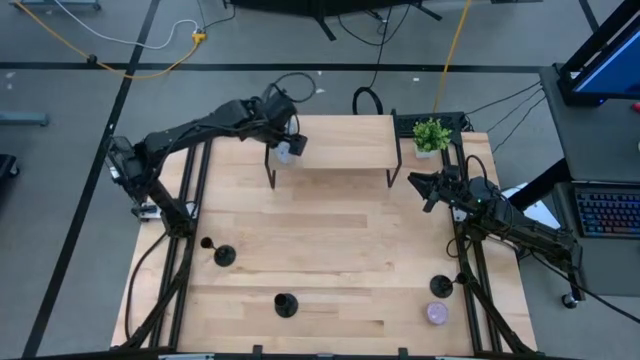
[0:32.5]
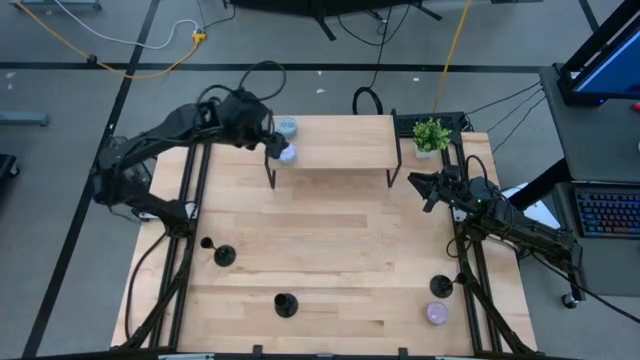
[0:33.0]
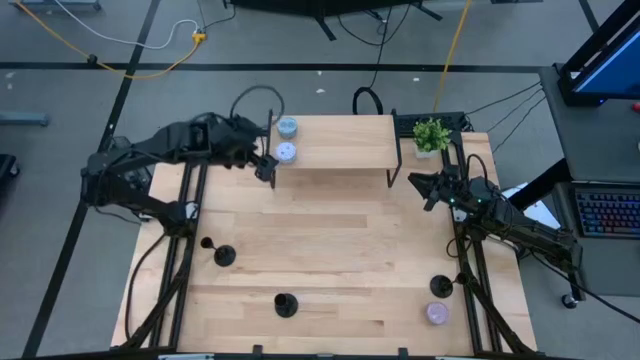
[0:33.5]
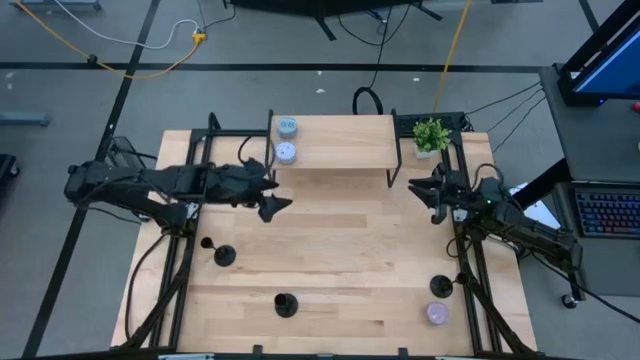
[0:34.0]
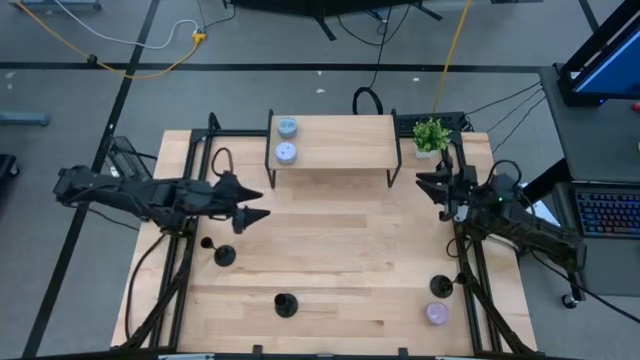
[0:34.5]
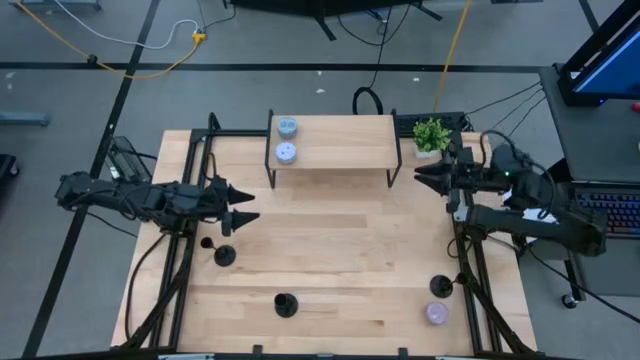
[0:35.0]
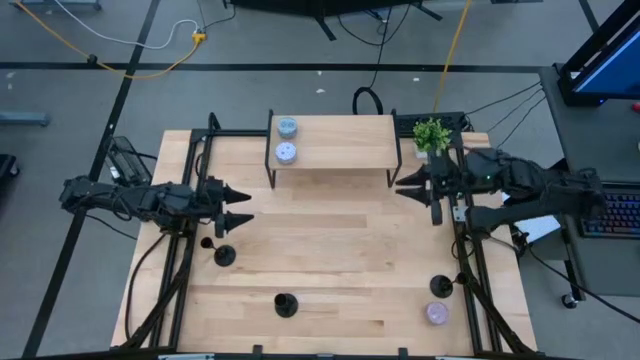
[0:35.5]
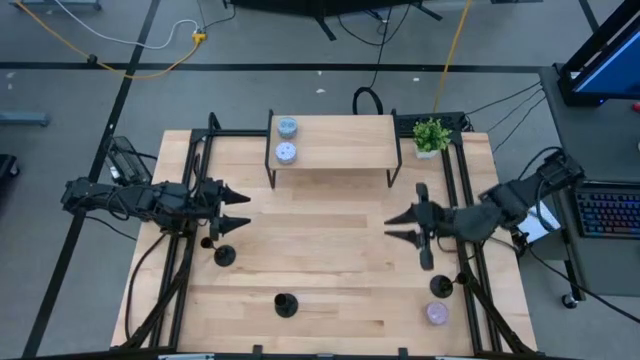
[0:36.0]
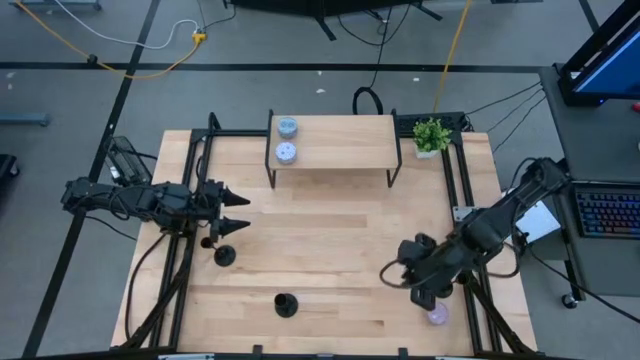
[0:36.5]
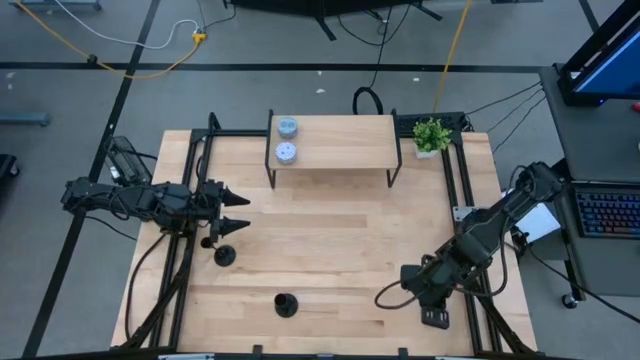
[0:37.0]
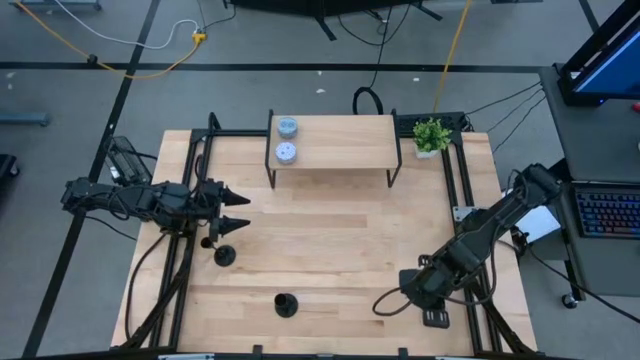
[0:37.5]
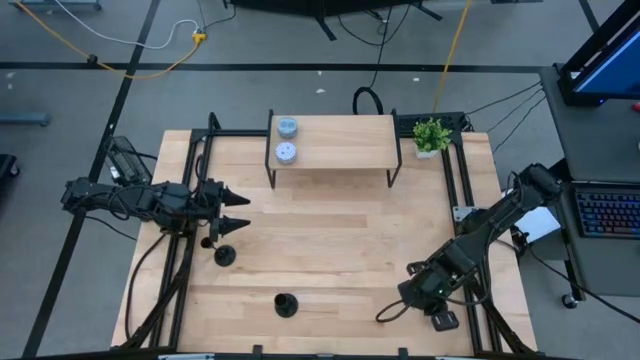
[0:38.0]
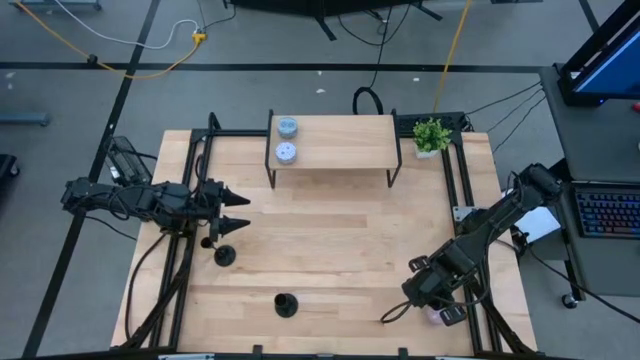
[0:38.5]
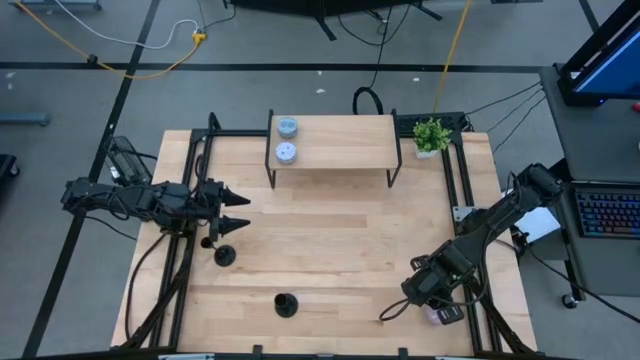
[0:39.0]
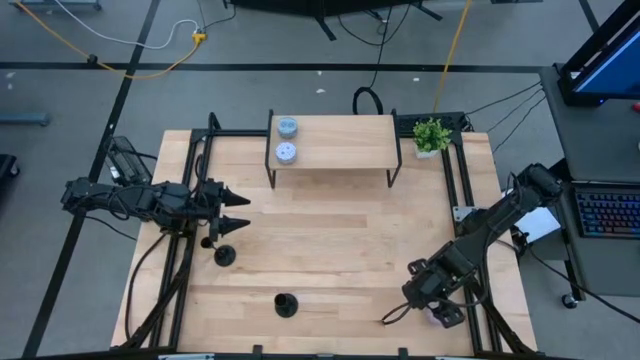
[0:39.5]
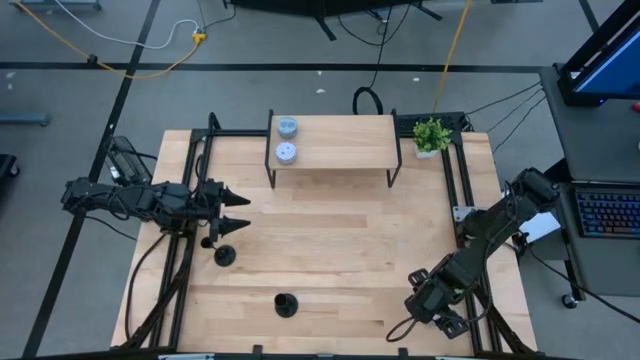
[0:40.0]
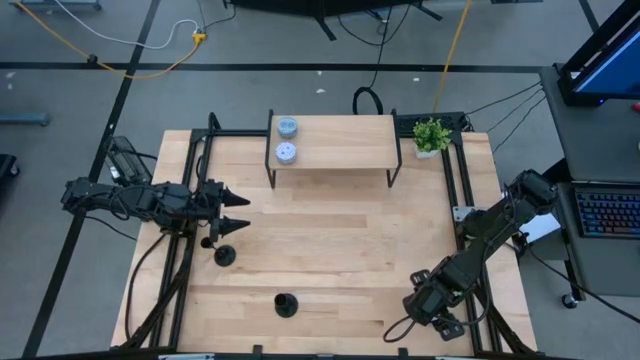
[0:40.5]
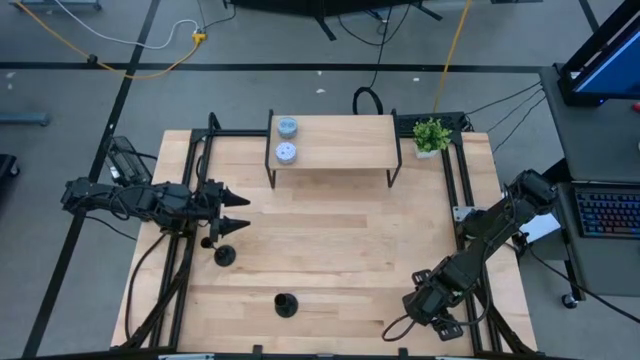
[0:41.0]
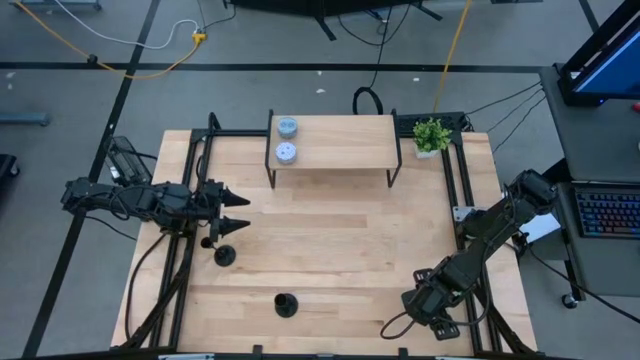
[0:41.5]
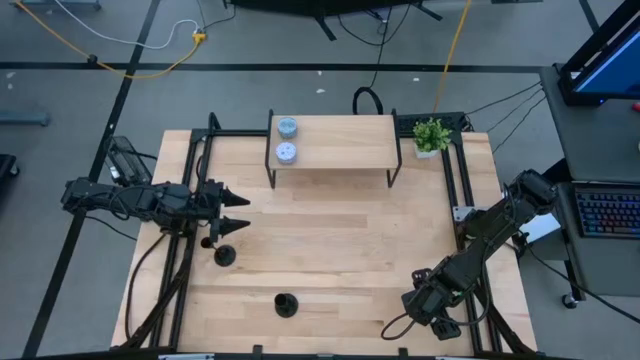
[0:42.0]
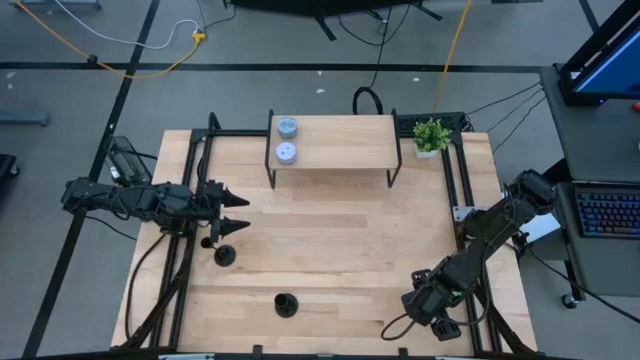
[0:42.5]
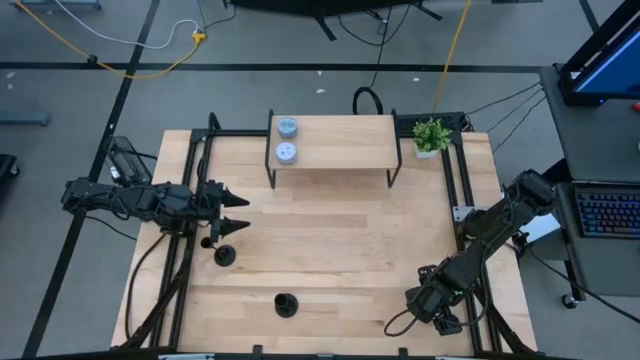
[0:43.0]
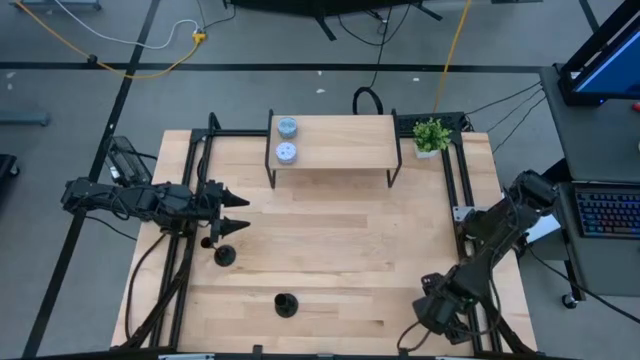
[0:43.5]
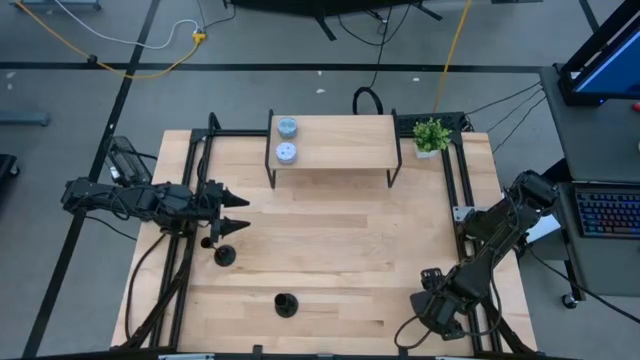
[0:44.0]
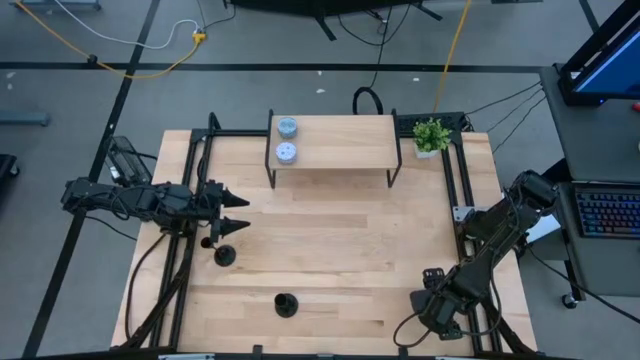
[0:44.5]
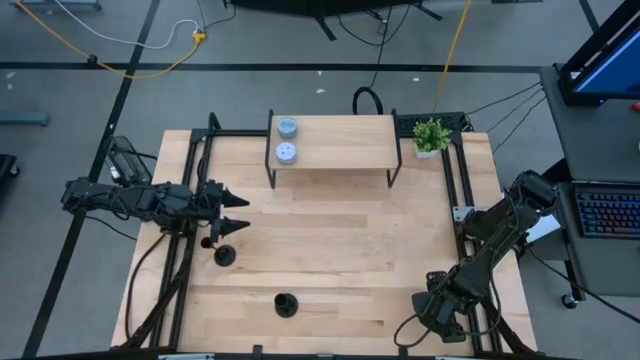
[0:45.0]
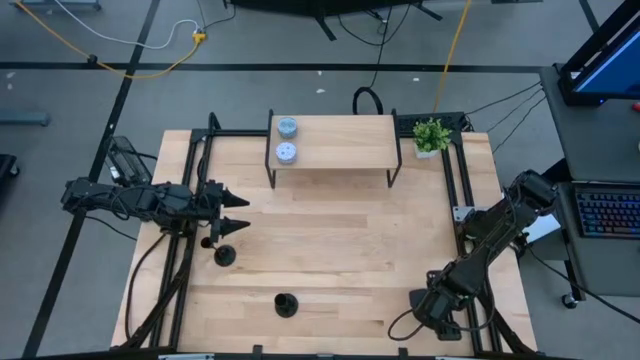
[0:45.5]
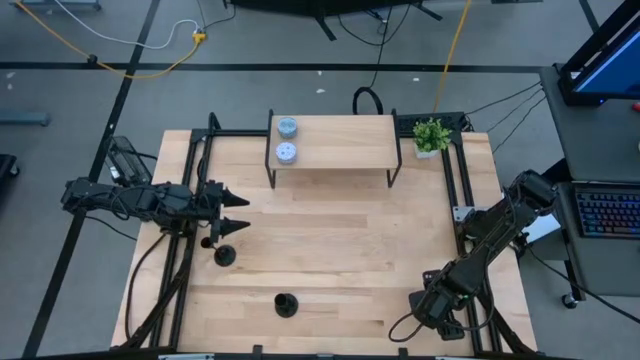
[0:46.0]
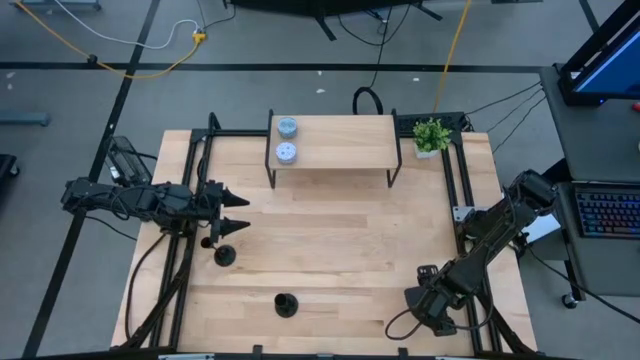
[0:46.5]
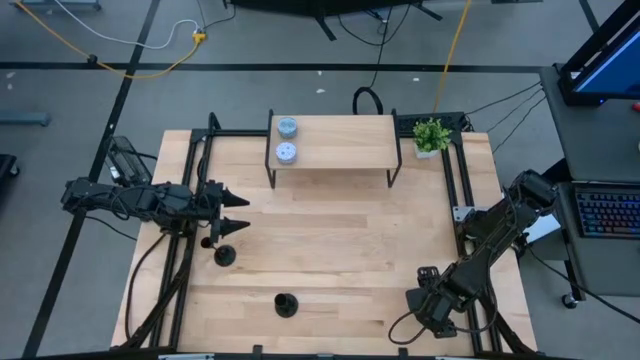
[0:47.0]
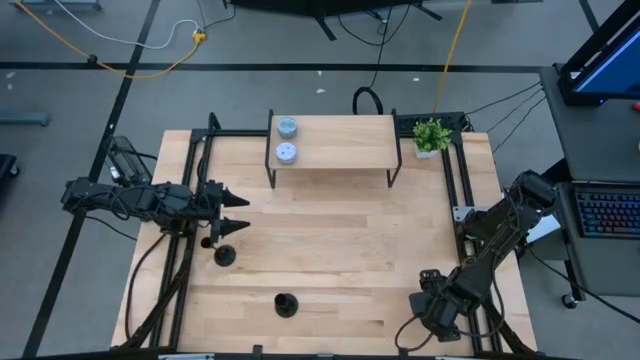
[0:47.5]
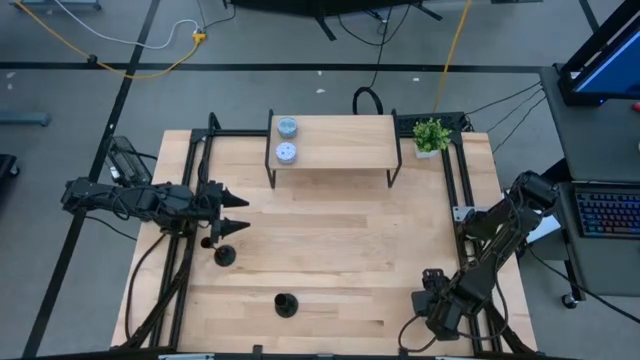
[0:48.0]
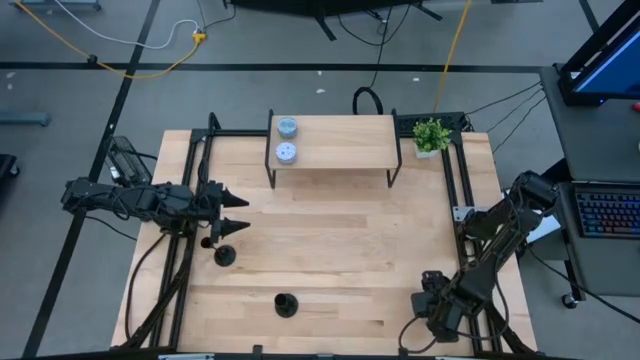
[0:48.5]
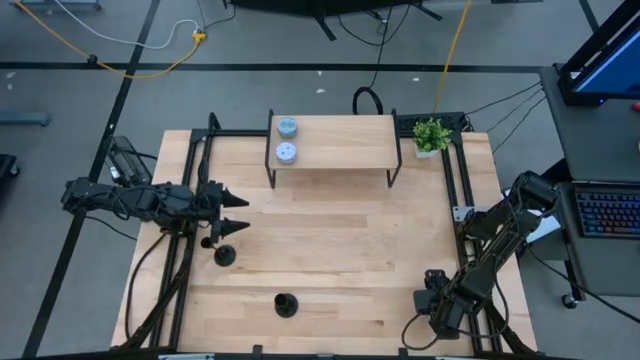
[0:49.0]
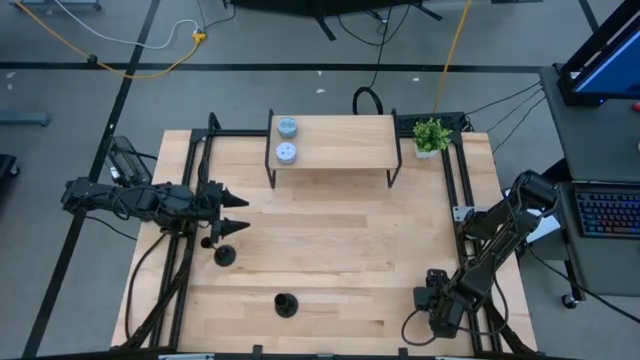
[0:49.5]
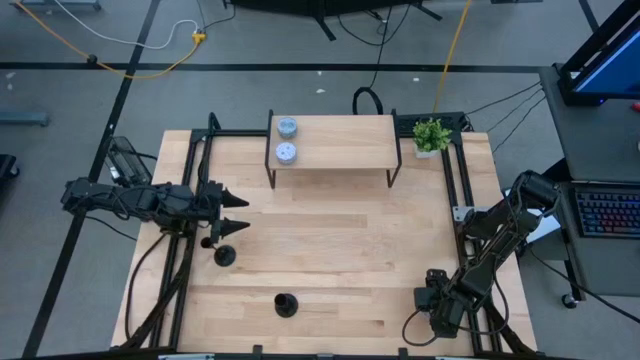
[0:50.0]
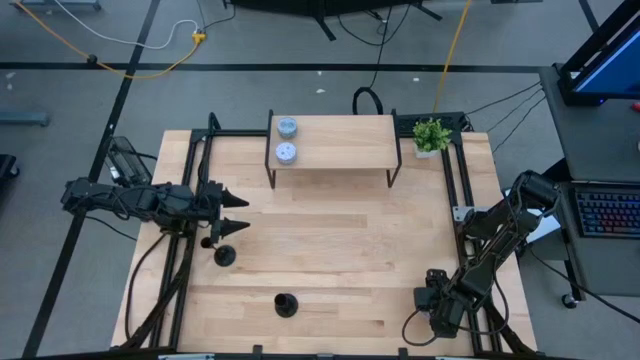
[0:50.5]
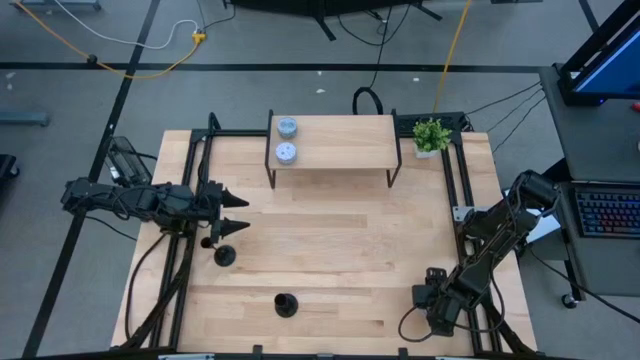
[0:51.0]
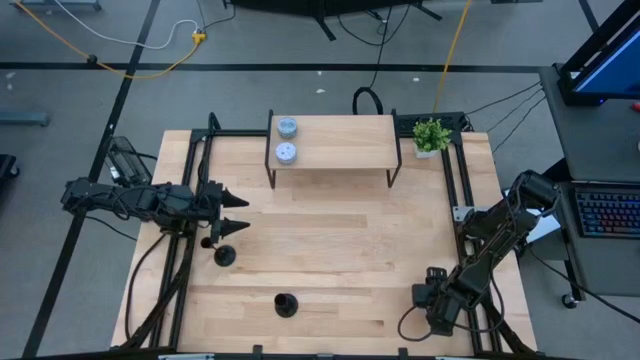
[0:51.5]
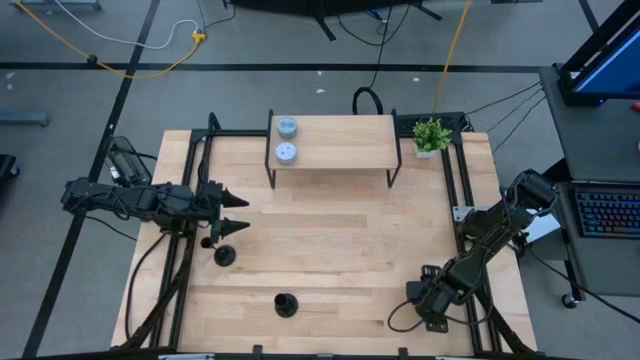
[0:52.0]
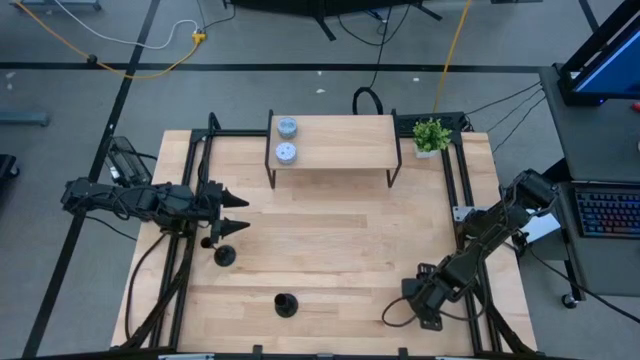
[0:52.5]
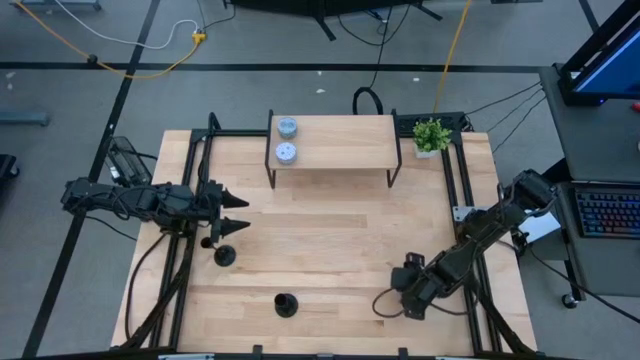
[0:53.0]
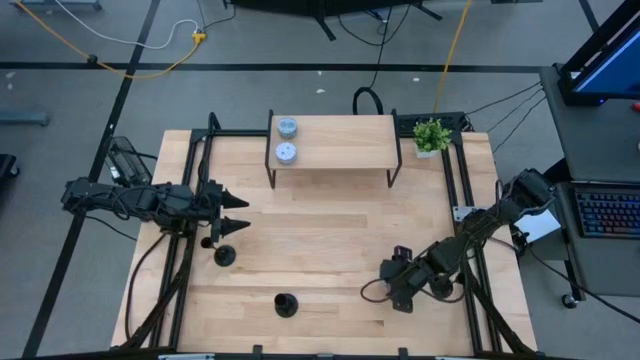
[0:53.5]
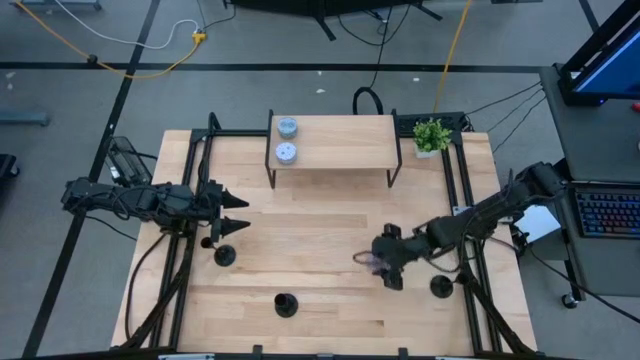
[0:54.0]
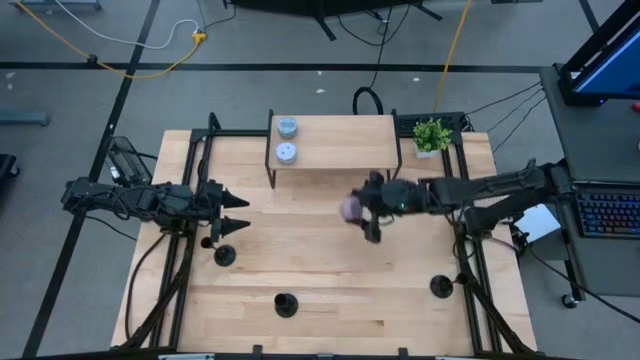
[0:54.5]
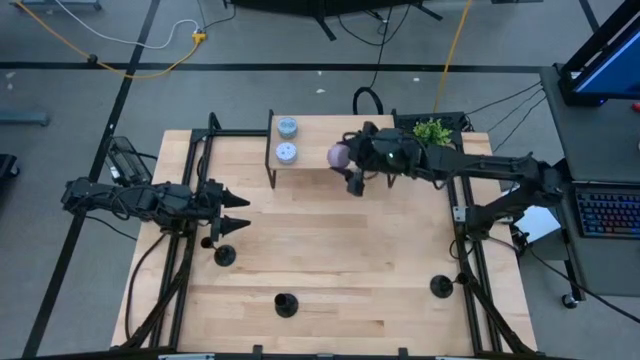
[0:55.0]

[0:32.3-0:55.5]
Task: Pick & Place candle stick holders
Put the pink scented candle on the shelf
